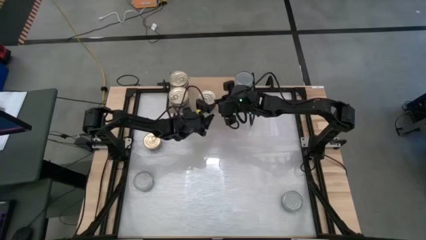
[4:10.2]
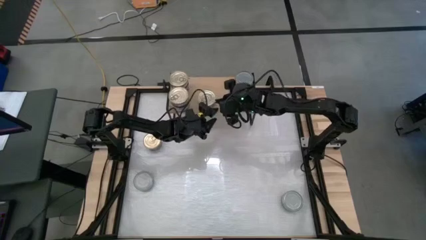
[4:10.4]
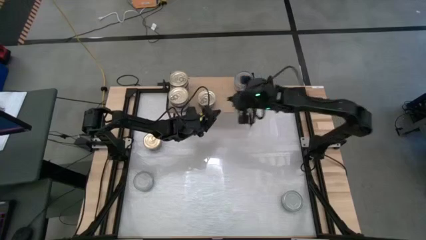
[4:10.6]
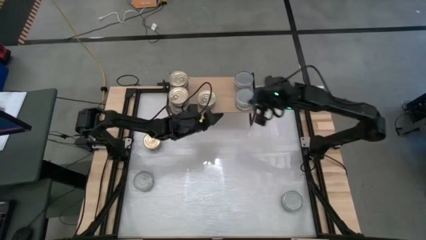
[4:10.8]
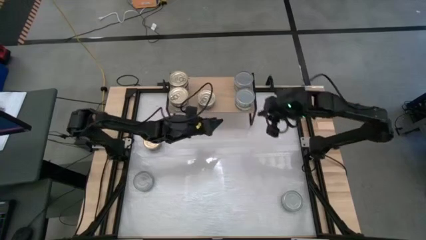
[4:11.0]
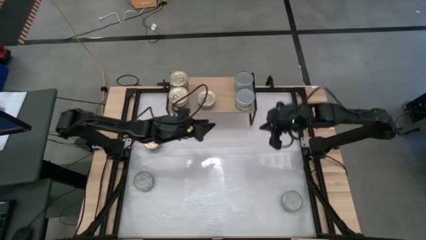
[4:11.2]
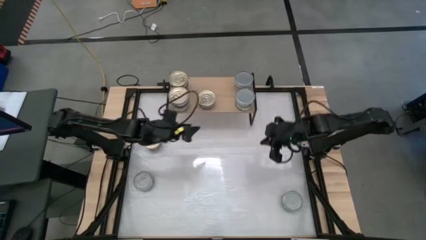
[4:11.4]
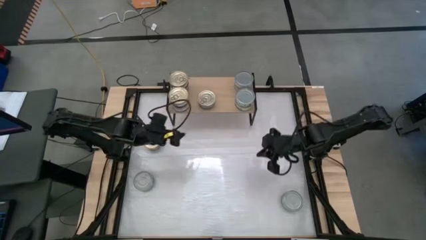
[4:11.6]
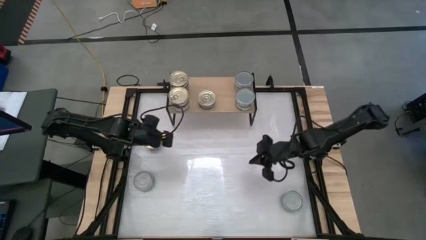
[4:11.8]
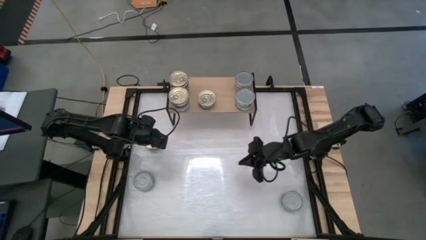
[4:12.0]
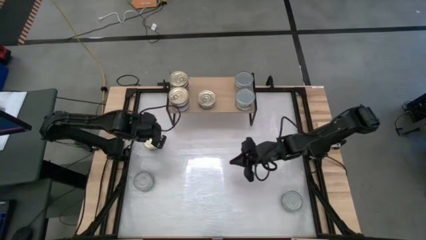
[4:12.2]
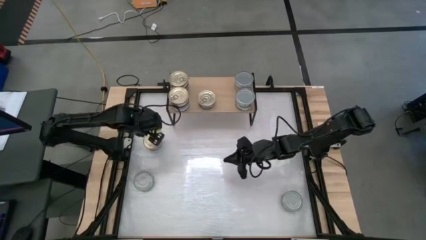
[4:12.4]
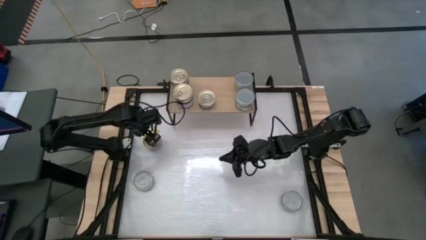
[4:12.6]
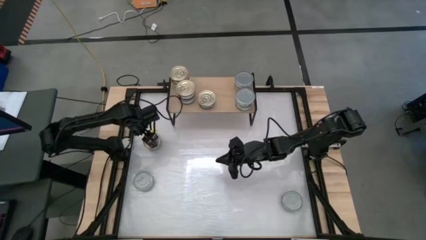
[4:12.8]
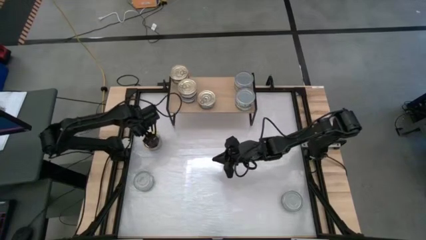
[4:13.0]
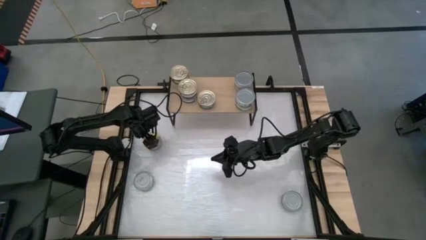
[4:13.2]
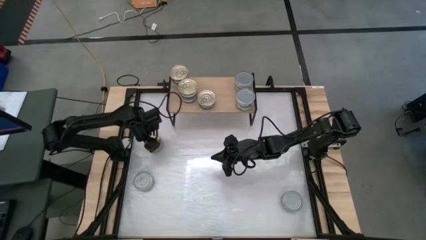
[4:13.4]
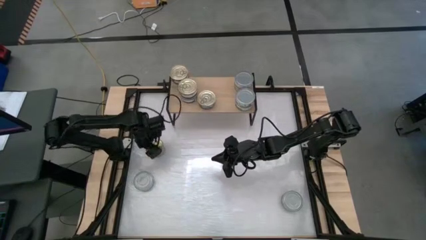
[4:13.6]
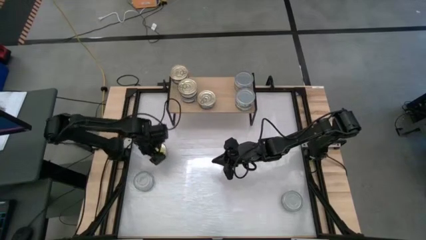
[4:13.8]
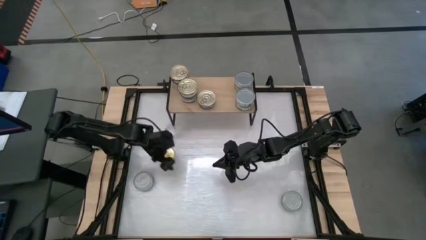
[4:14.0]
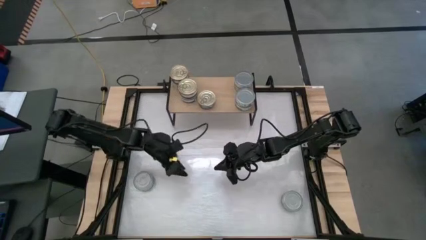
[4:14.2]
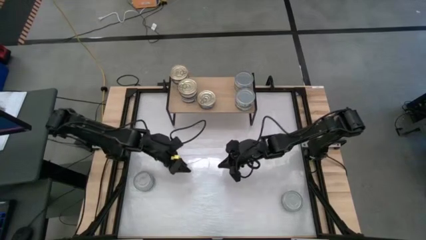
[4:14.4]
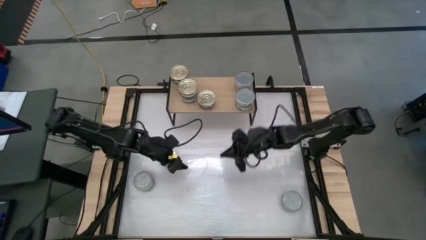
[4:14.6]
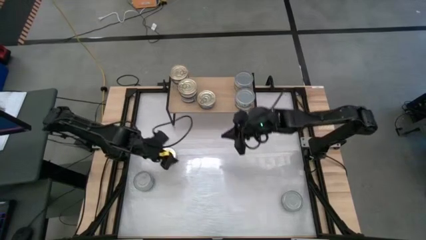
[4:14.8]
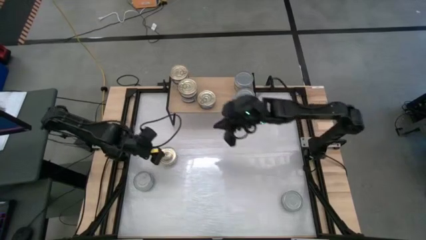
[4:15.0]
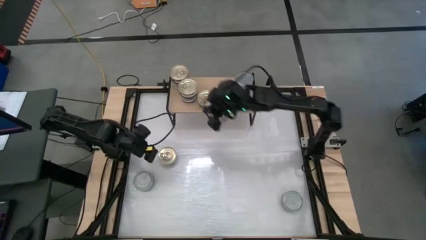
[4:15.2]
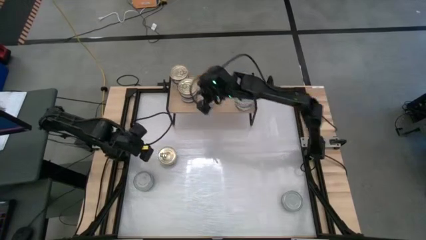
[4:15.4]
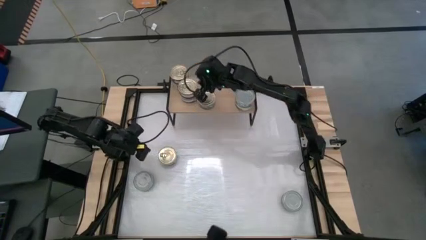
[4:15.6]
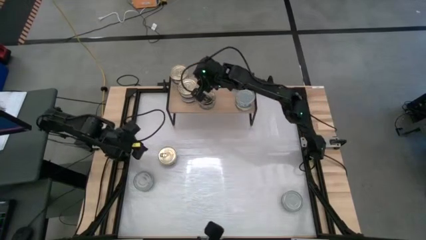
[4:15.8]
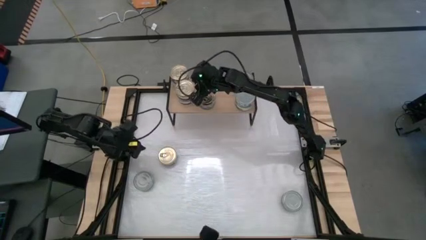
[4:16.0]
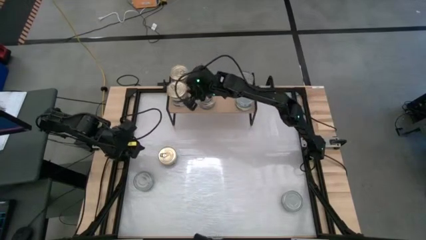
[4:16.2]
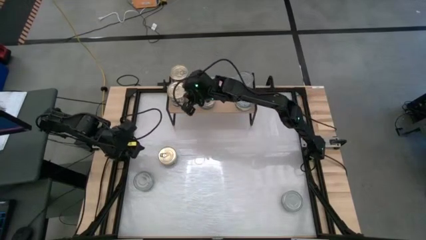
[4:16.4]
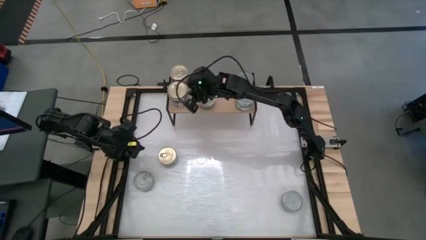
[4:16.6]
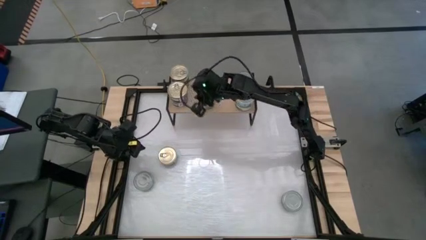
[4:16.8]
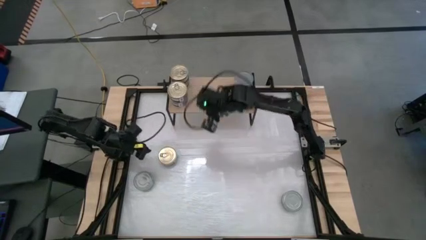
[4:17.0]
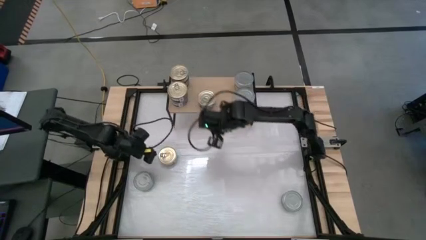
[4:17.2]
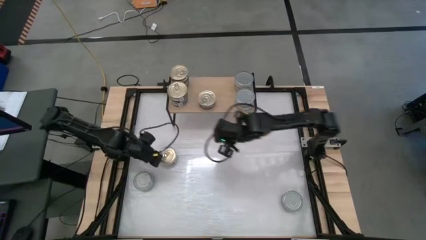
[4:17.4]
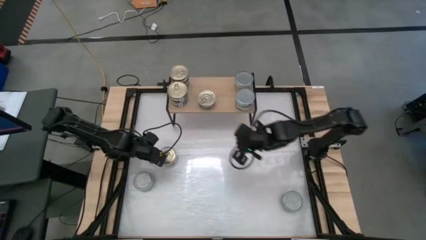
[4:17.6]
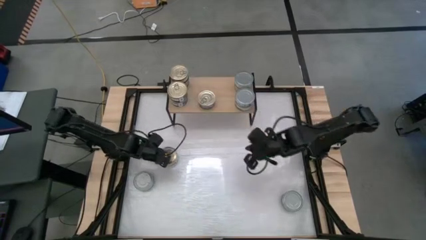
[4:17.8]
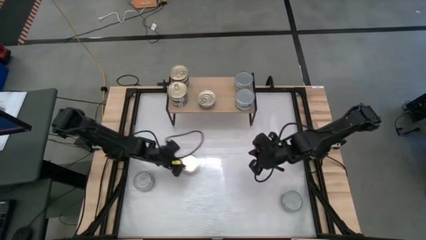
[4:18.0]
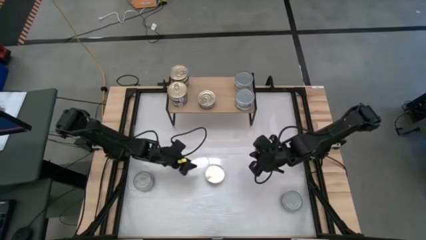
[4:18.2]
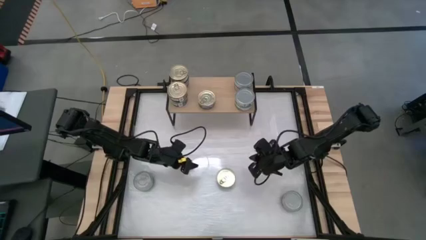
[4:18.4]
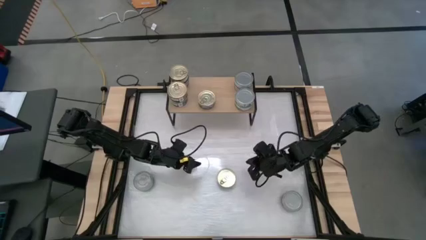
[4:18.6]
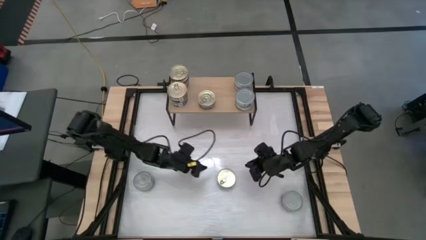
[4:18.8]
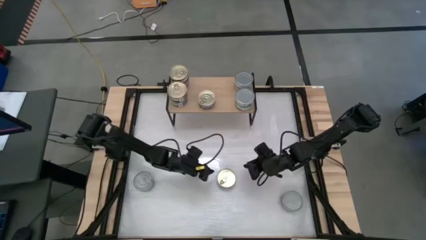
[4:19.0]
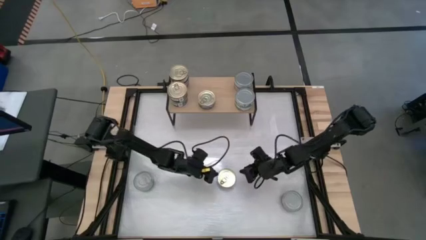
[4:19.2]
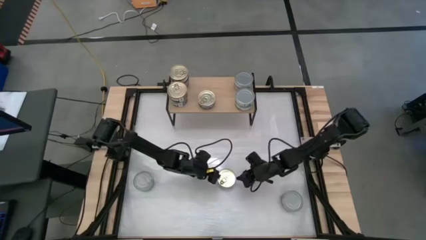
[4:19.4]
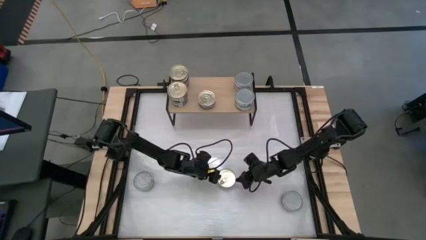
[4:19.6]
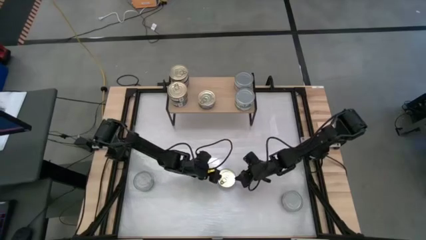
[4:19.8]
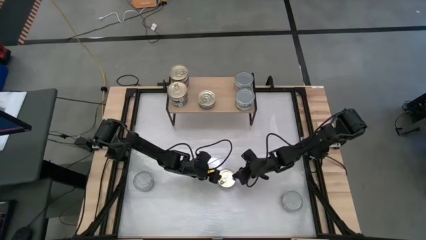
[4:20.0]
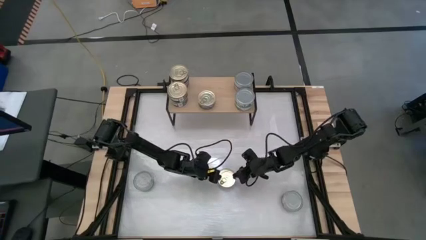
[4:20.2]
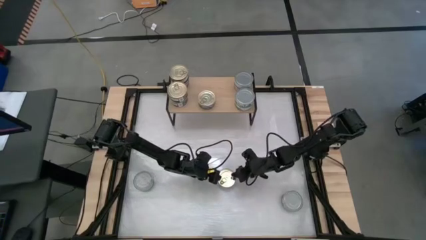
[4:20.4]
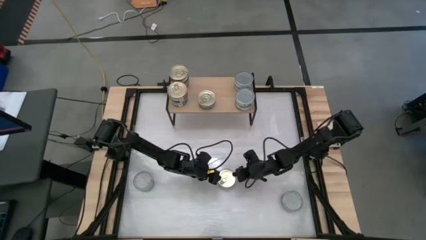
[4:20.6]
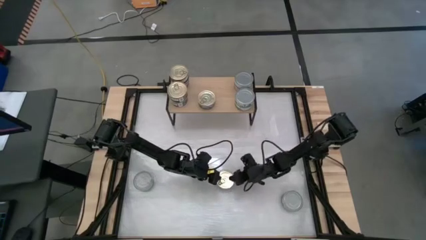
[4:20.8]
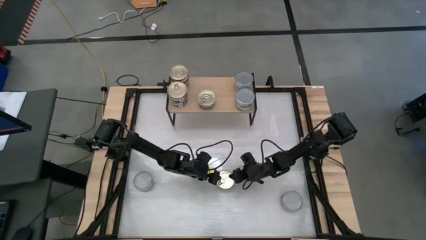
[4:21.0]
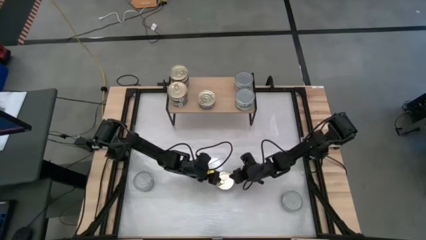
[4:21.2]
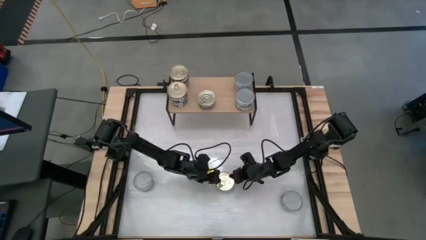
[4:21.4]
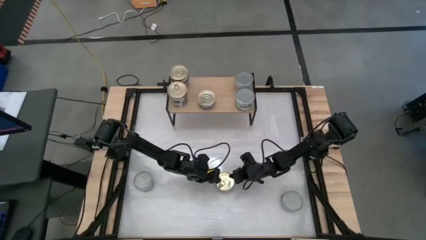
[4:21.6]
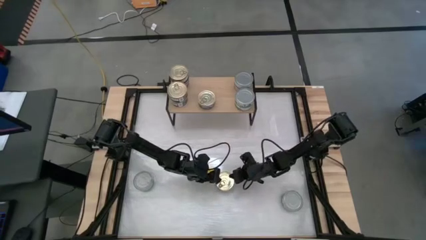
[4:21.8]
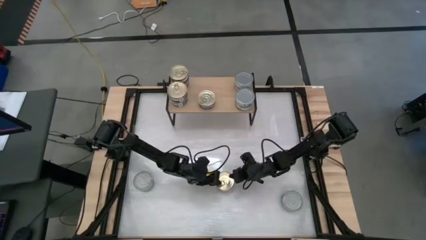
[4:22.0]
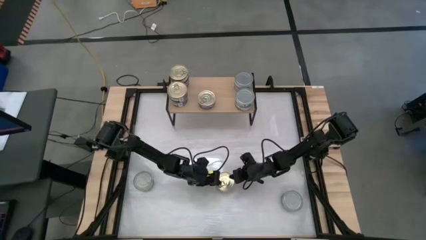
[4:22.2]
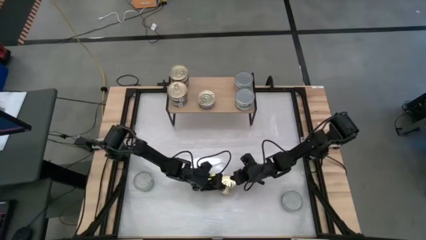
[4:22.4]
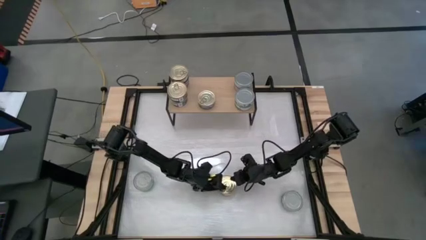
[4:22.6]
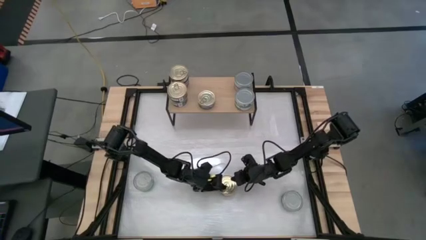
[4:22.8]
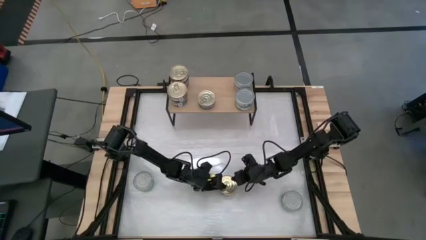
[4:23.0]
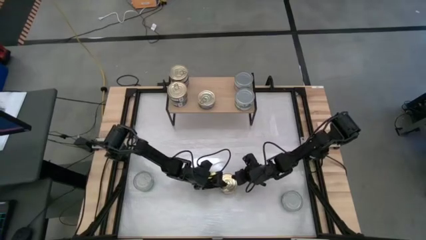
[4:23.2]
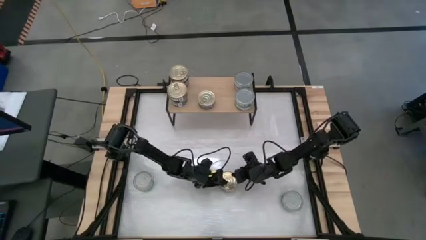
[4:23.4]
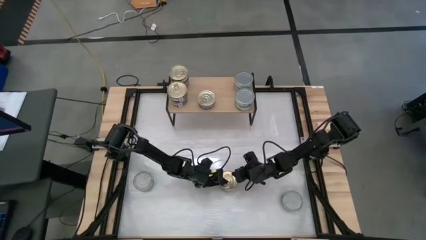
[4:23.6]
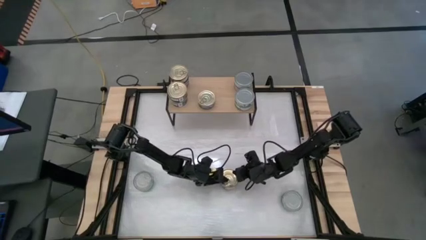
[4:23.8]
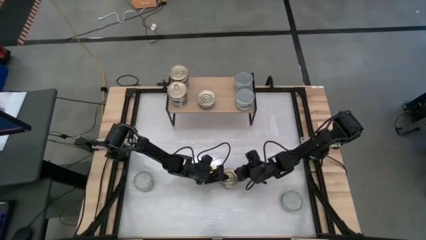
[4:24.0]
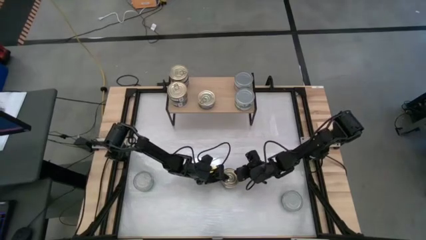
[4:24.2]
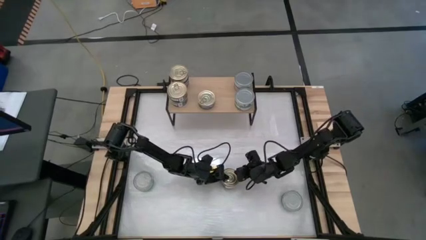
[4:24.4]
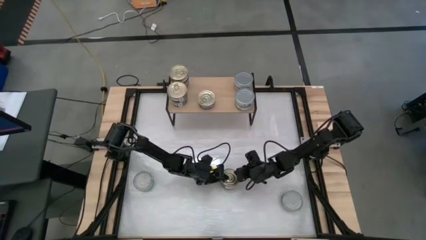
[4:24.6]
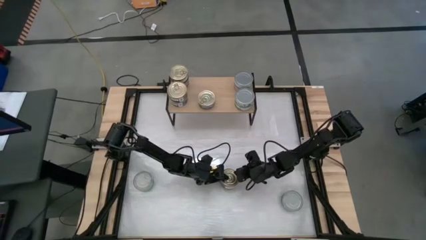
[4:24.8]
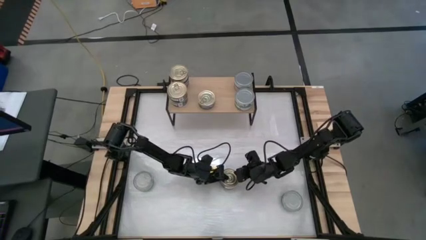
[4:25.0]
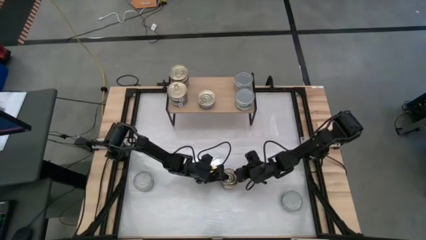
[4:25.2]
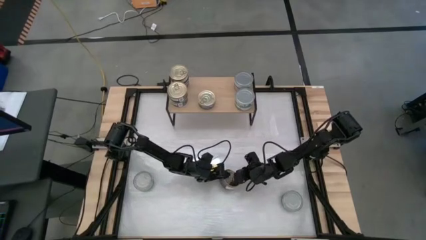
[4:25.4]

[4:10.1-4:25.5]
Task: Stack canned seafood by type on shelf
Stack the blue pink tuna can on top of the other blue pink tuna can on the shelf
